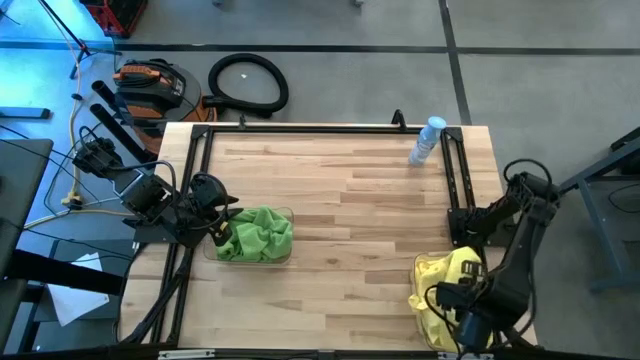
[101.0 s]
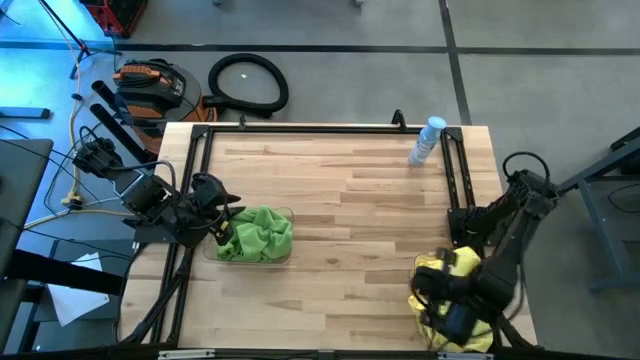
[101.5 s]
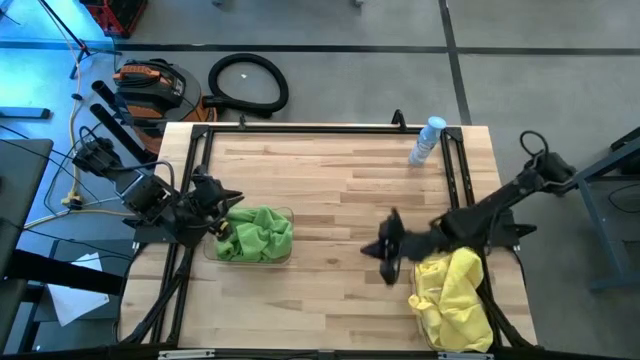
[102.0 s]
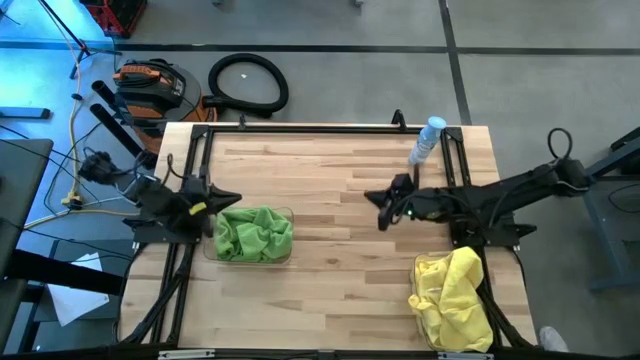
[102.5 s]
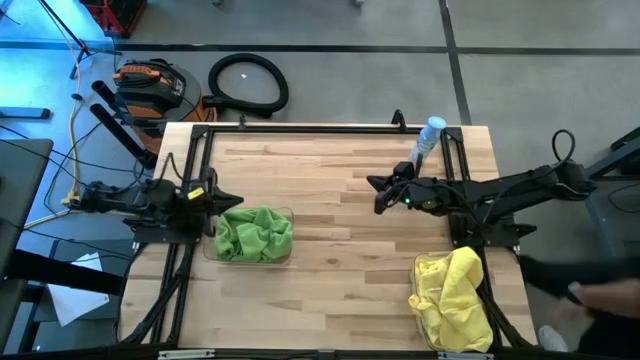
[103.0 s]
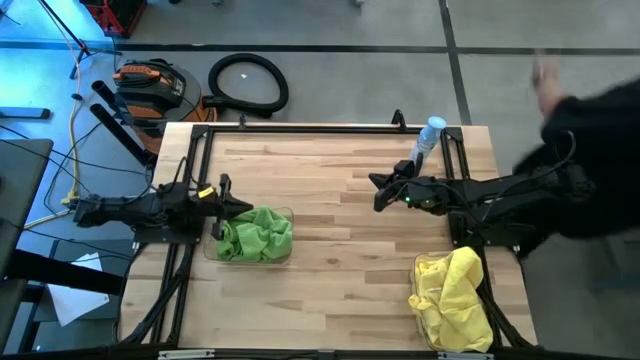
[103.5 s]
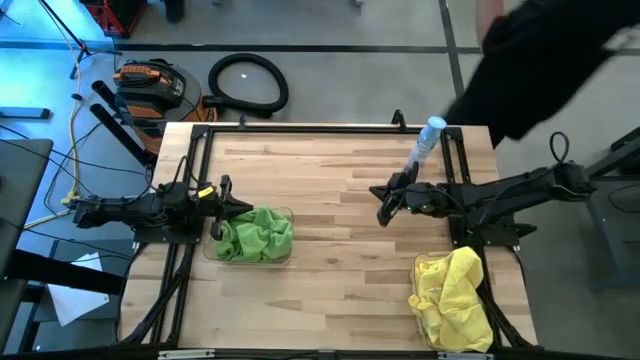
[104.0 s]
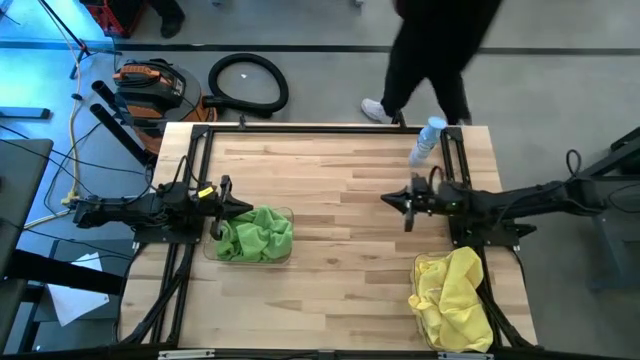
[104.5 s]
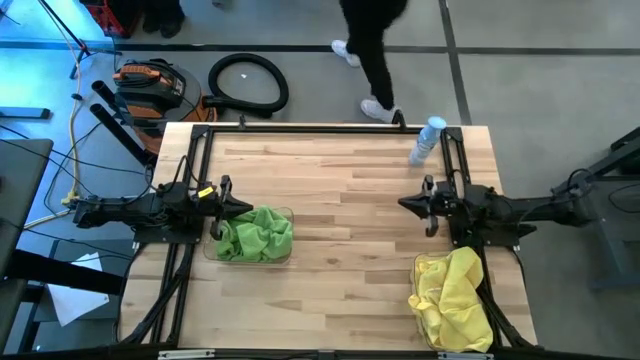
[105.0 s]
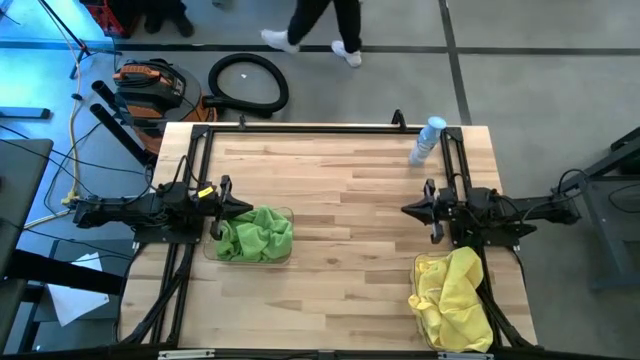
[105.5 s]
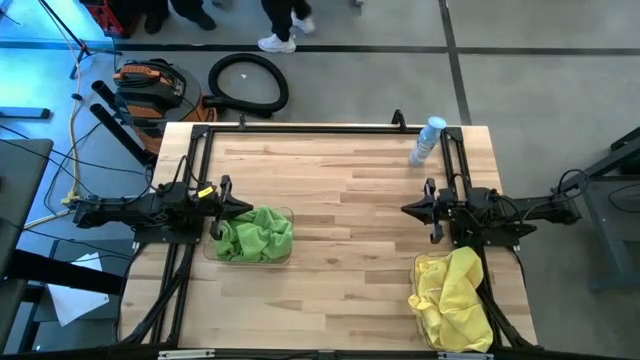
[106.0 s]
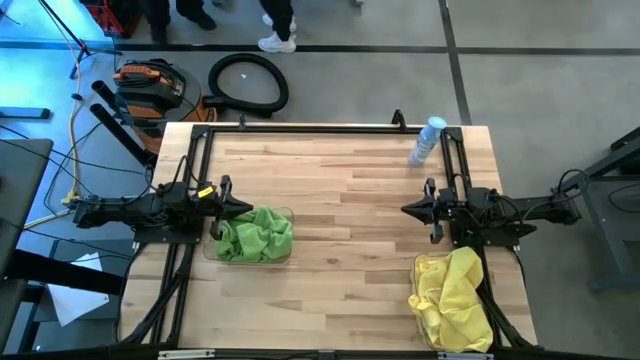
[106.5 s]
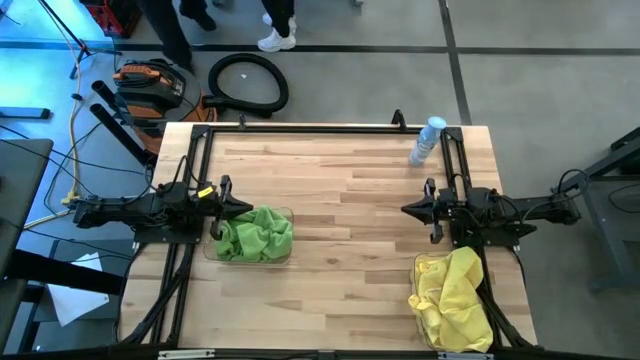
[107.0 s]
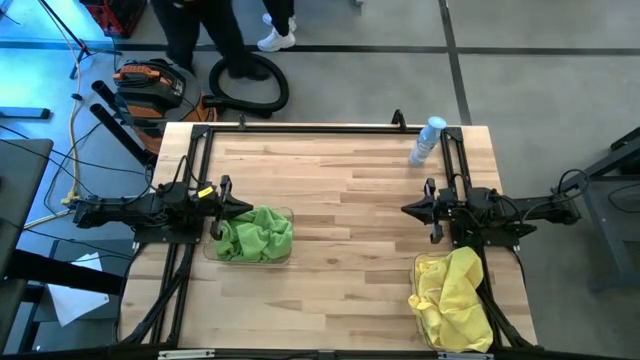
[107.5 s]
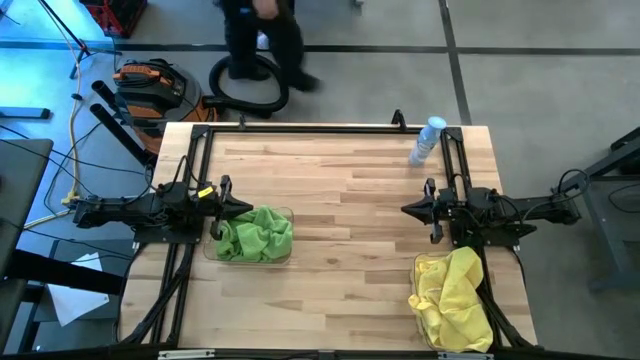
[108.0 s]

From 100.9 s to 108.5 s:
Task: Sort microfiber towel by color & place in baskets
Return to Home Position

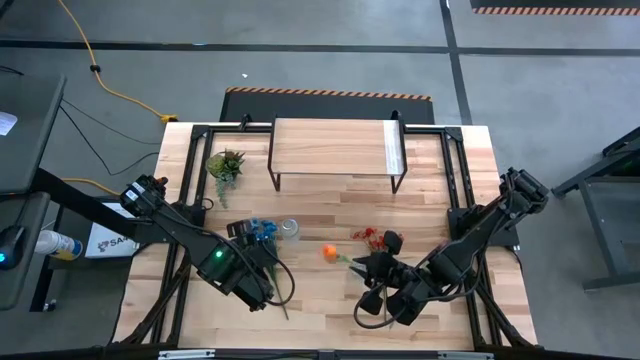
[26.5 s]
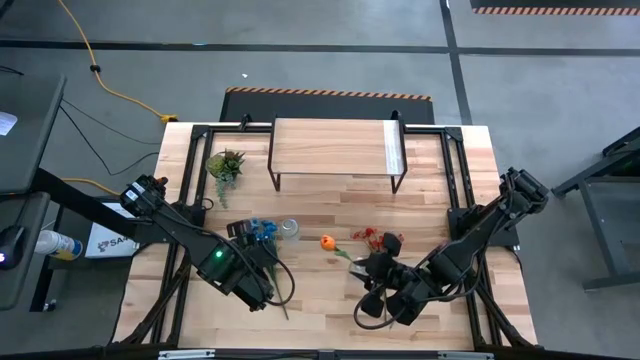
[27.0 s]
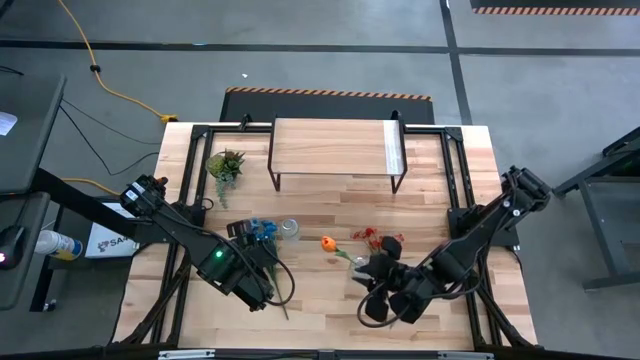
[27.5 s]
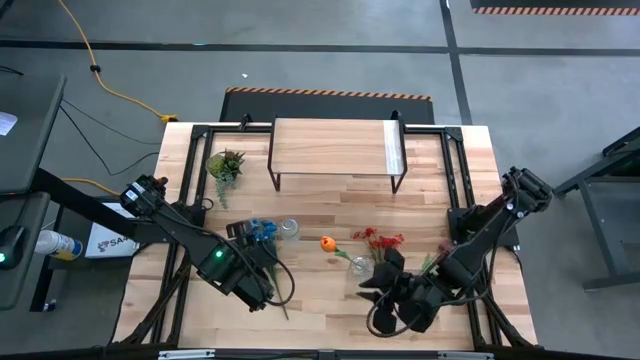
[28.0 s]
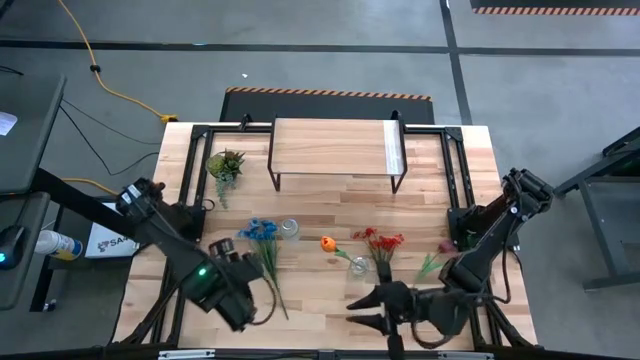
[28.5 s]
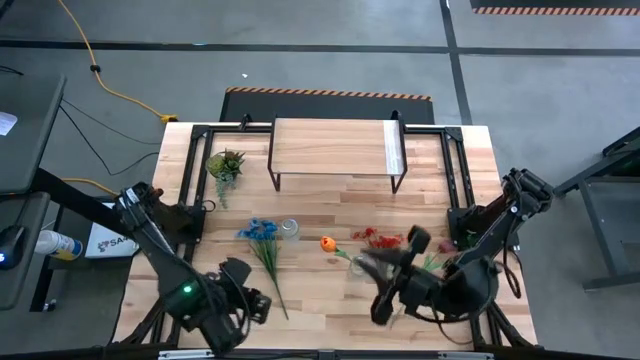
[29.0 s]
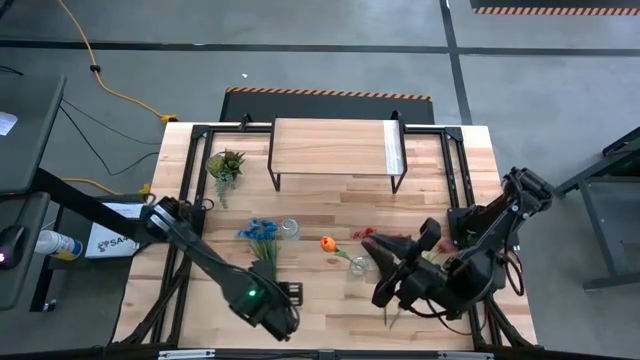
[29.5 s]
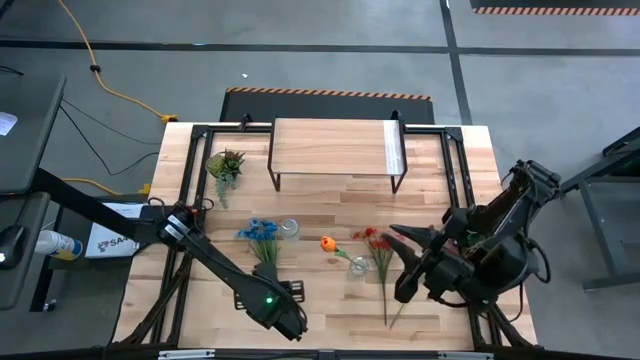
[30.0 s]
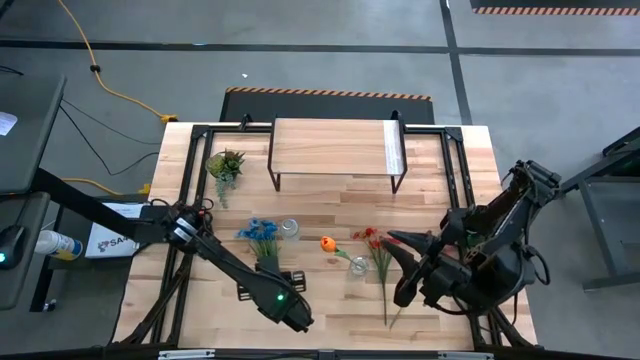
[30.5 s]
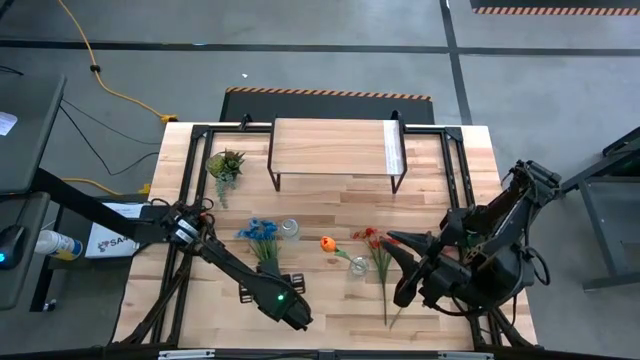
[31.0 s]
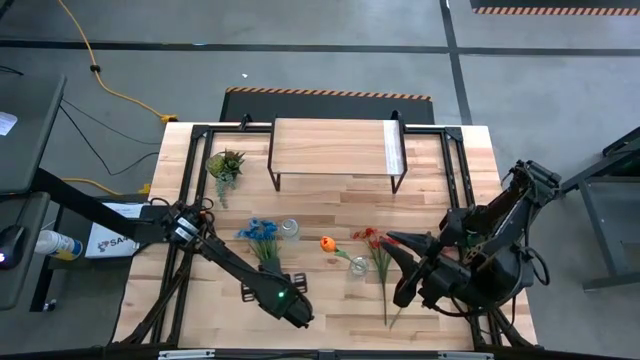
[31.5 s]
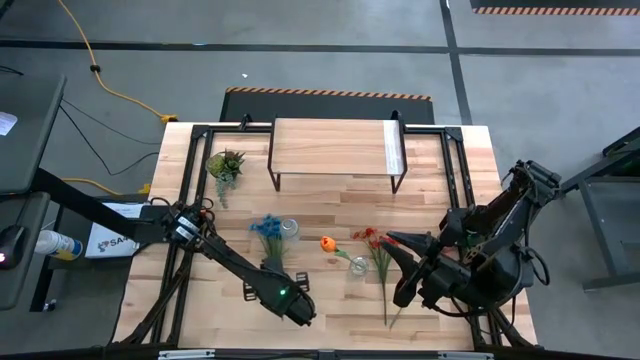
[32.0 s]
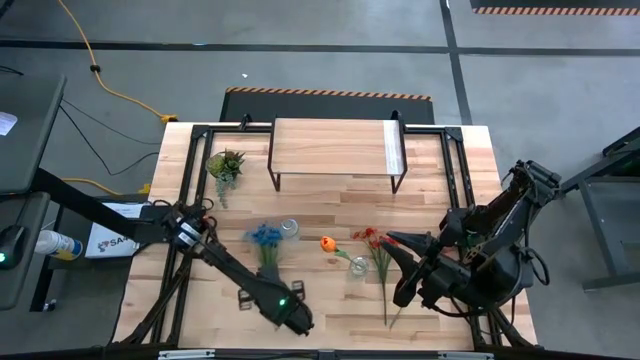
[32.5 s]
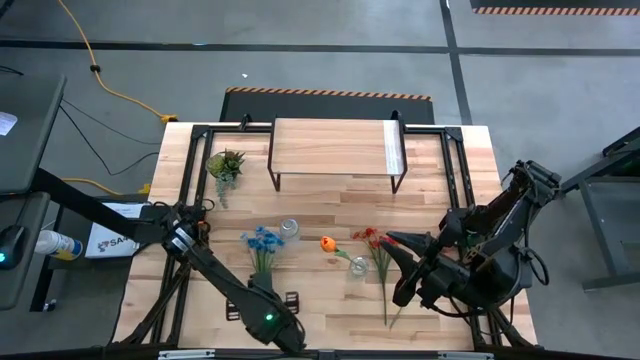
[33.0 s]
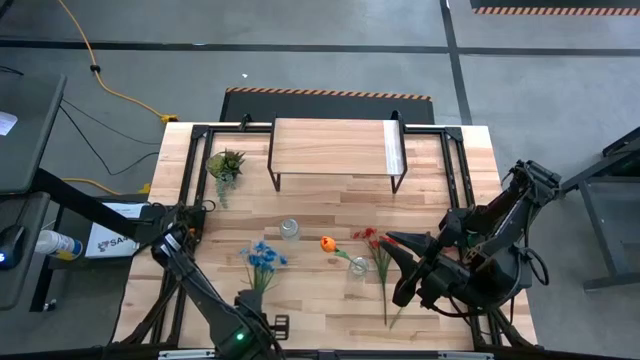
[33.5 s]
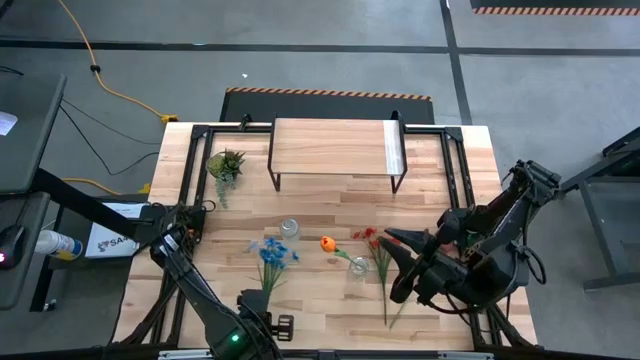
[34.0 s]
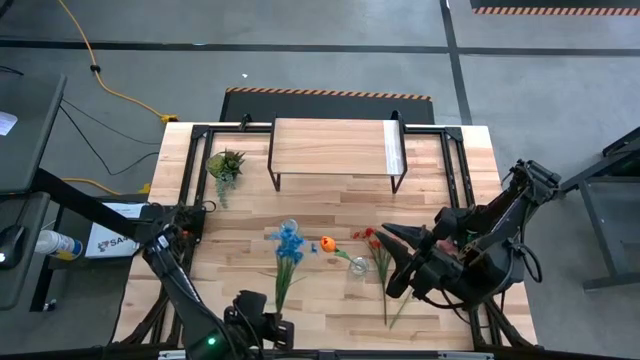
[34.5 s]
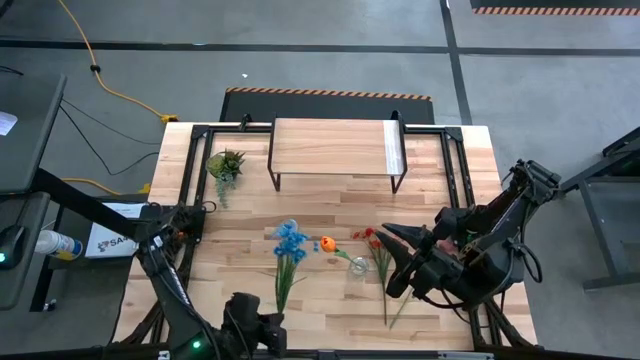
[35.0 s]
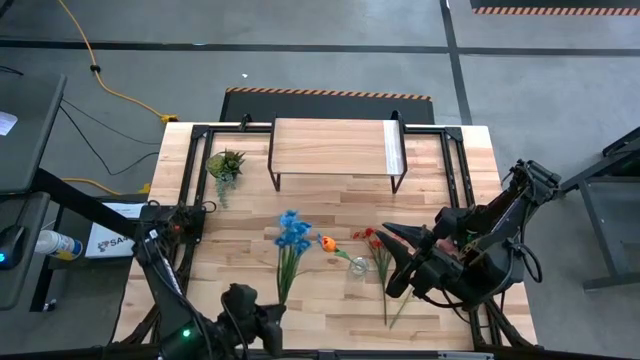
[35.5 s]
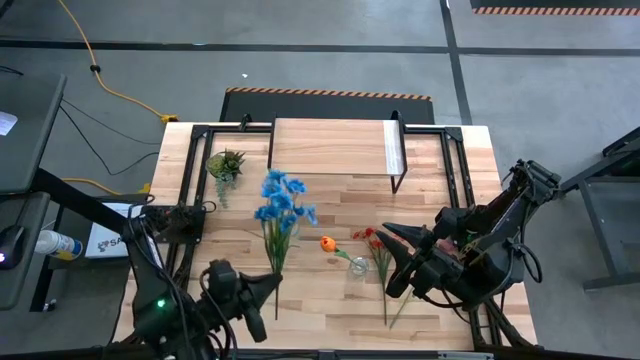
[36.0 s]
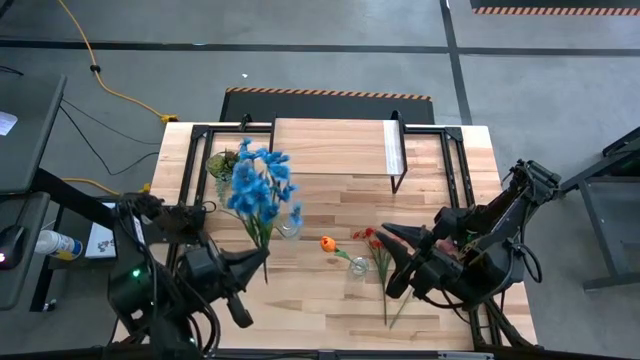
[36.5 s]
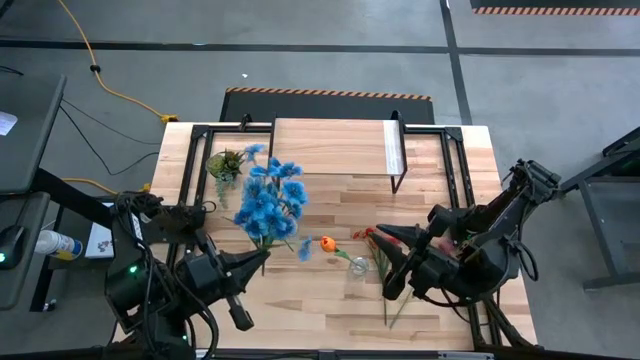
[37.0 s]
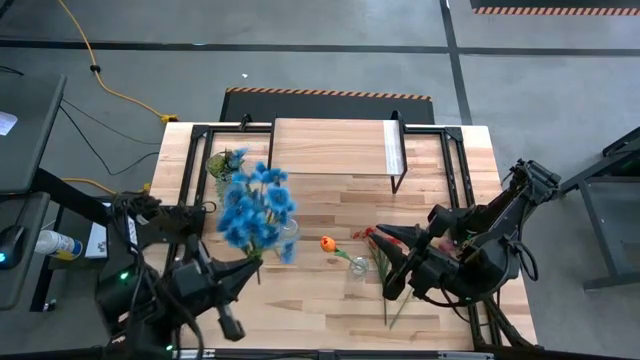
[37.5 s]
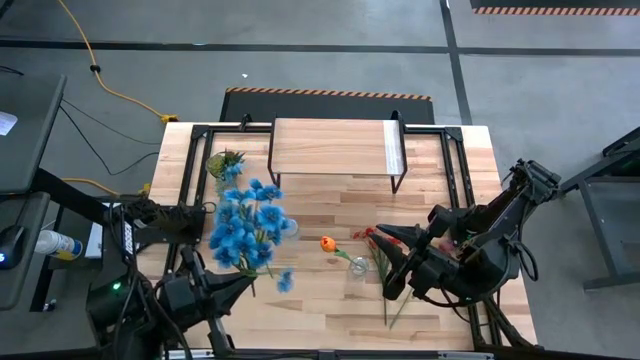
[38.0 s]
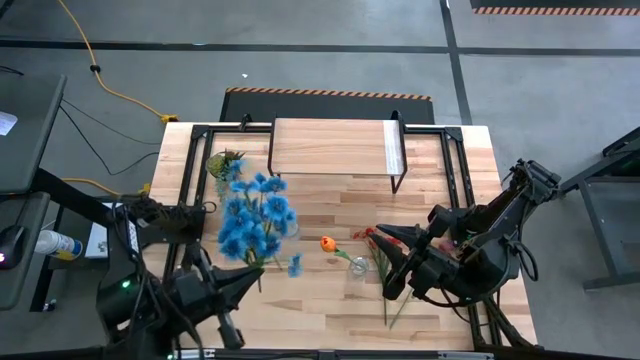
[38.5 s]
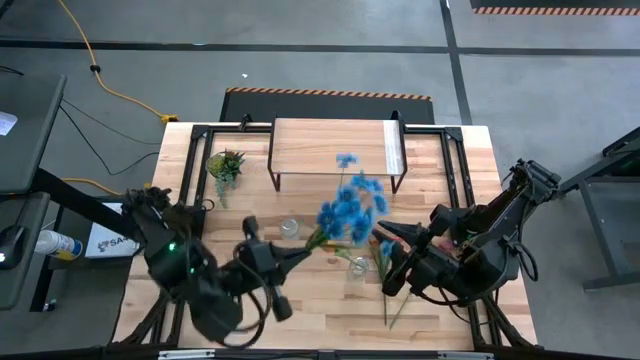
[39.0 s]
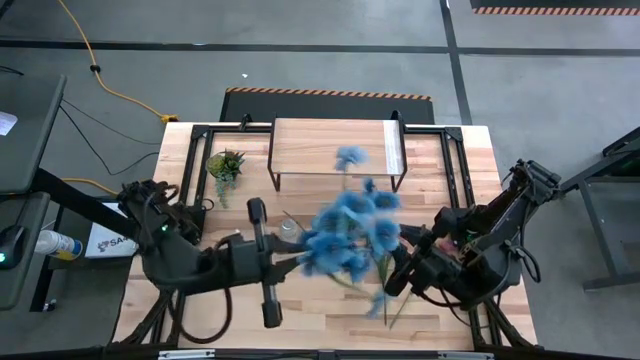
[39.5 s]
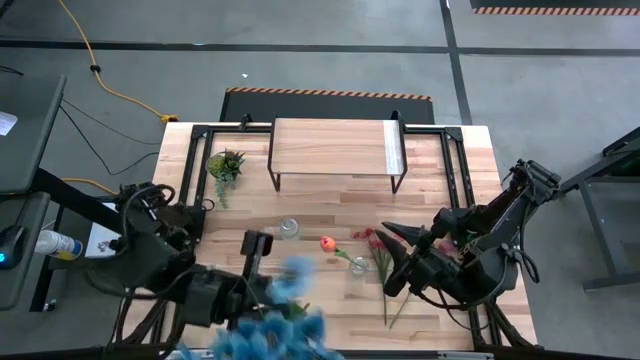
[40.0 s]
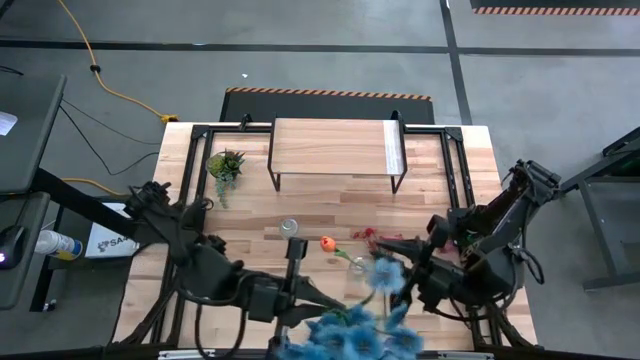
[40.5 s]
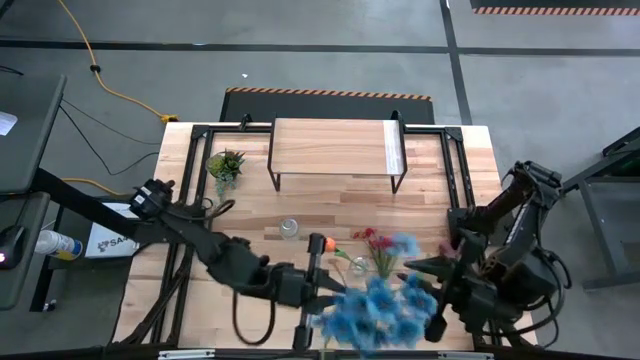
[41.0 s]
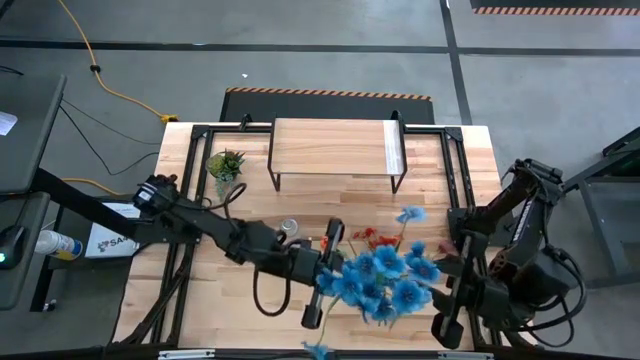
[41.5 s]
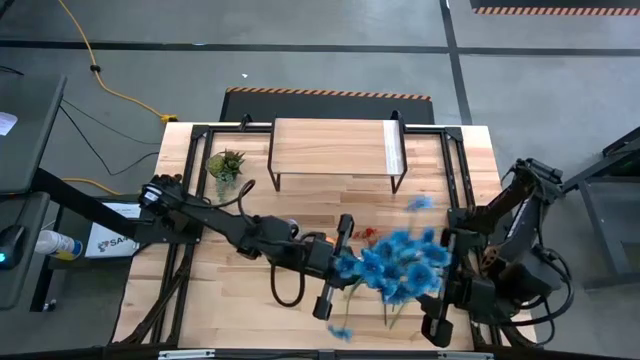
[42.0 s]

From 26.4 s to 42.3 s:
Task: Pick and place flowers into a vace then onto a shelf
Put the blue flowers into the right transparent vase
